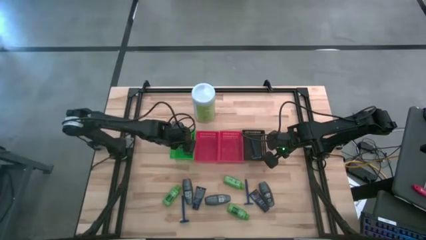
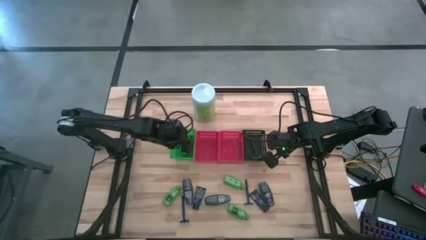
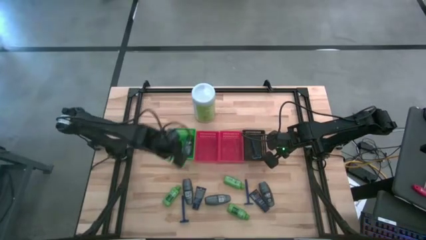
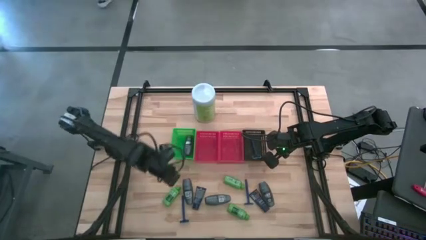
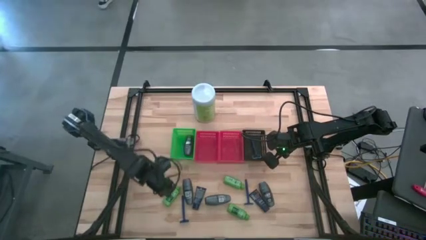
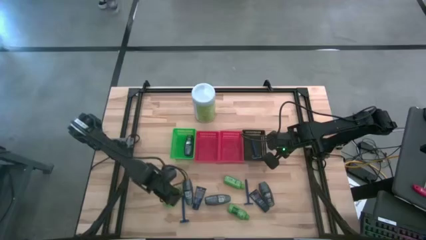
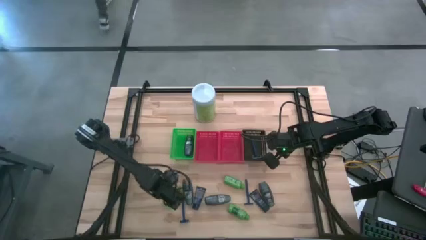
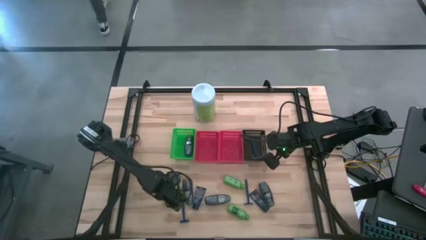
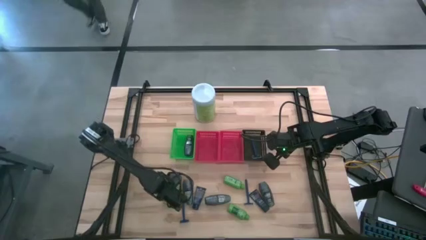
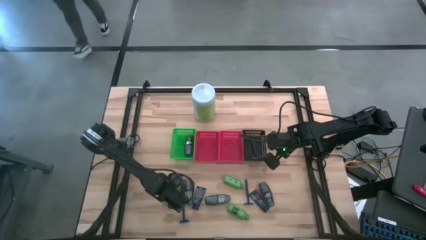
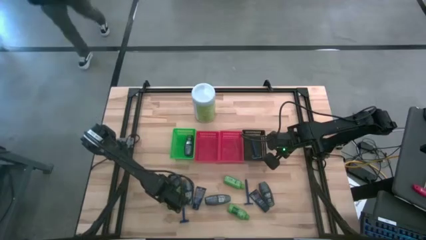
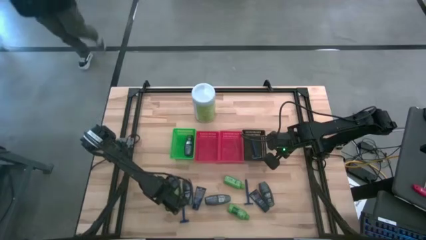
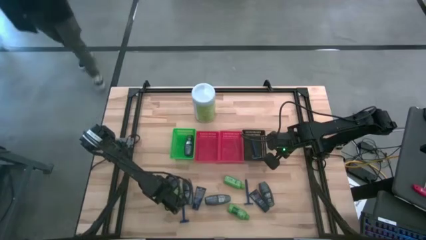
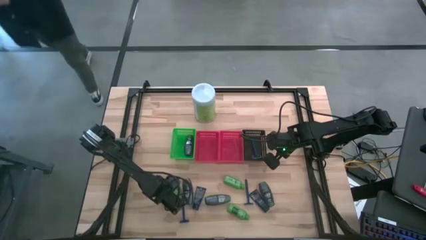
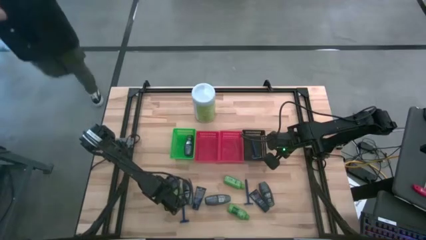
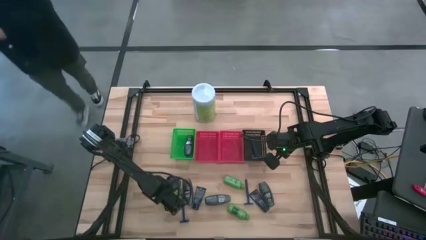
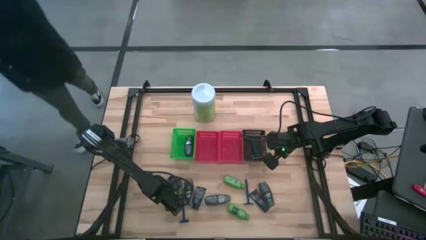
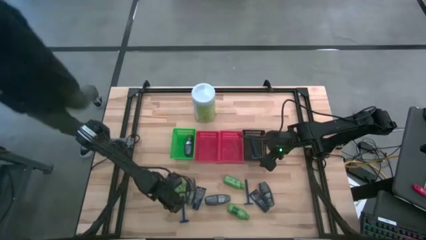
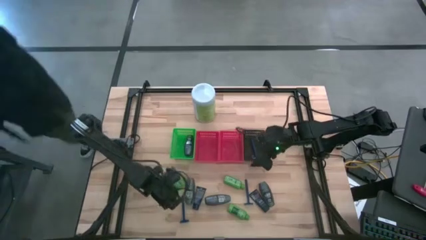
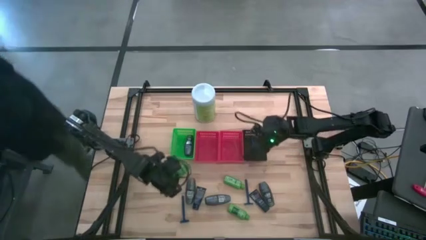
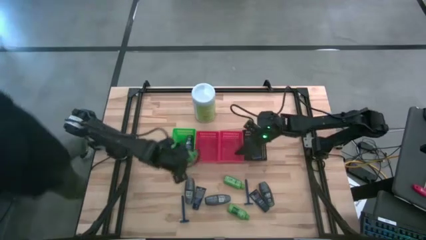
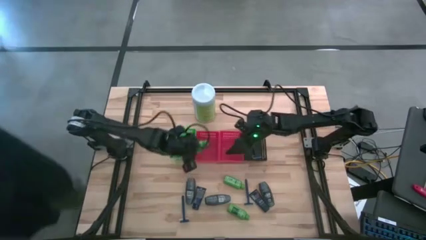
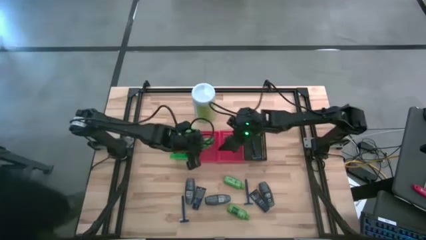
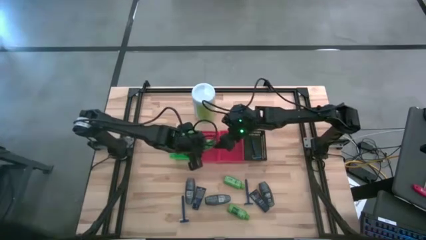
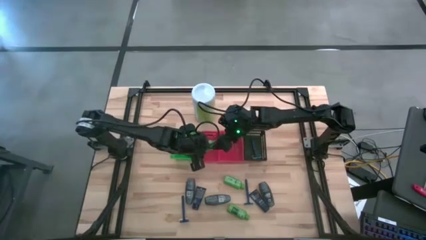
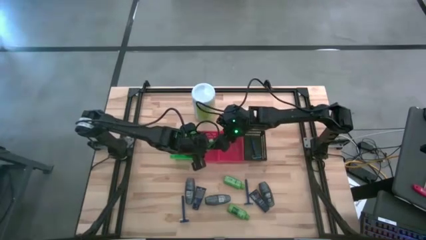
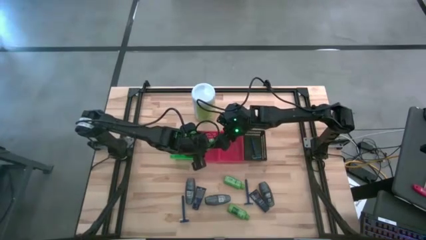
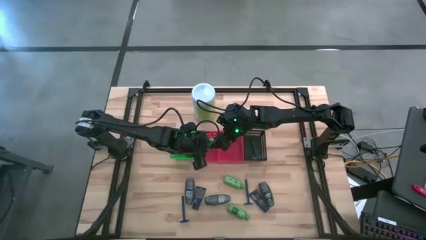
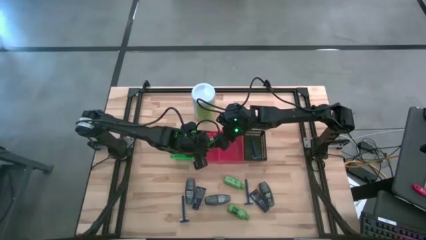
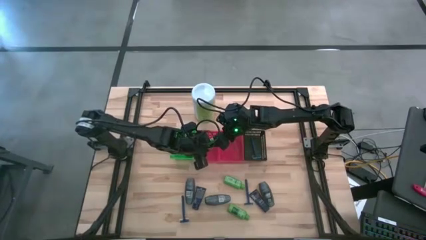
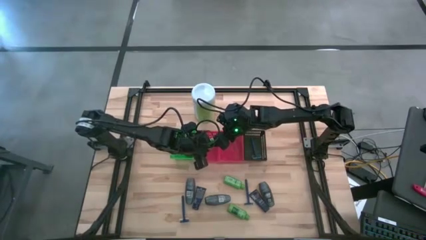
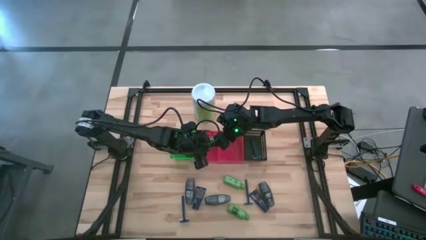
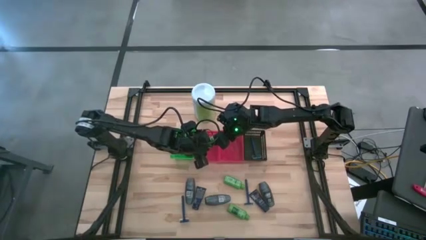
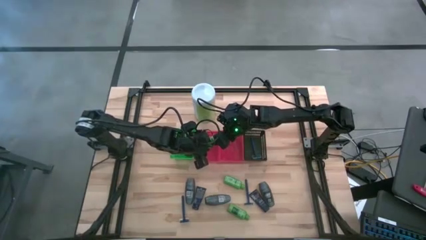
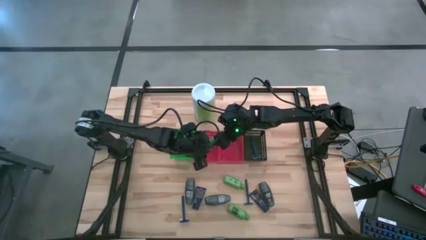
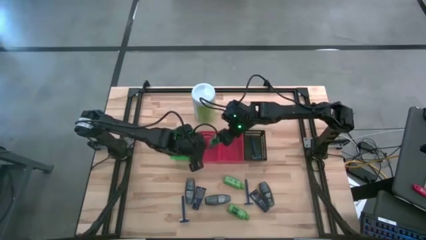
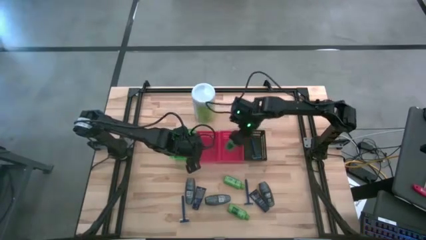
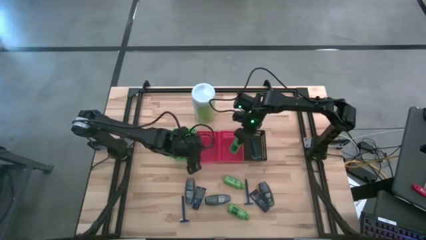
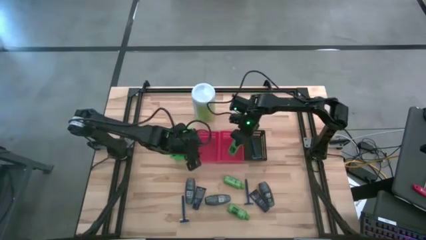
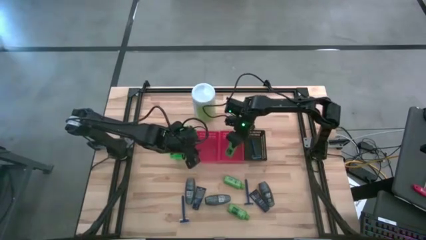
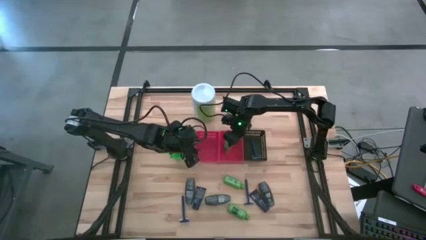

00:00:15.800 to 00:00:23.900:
Task: Pick & Place Travel size toiletries
Put the green shampoo in the right red bin

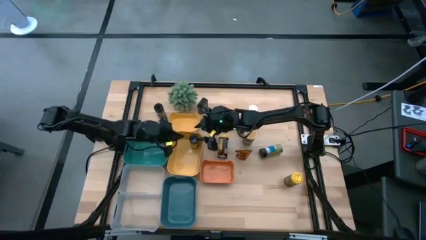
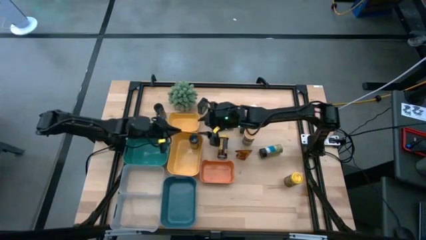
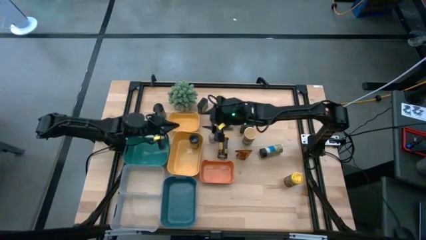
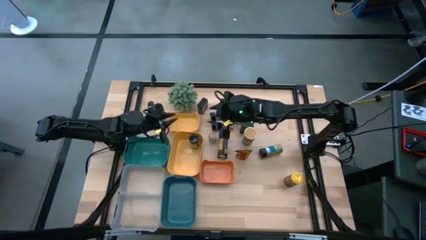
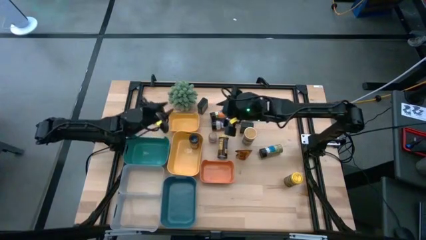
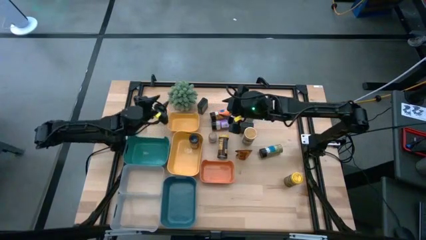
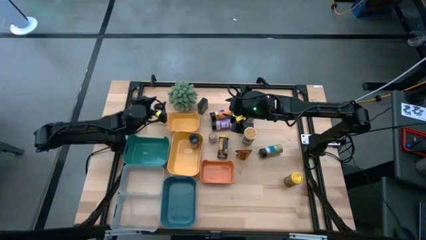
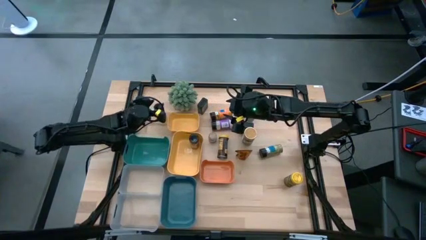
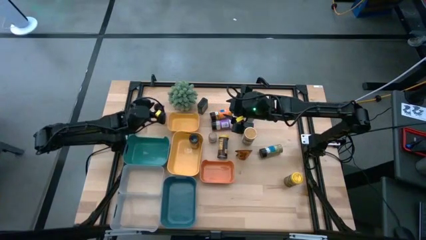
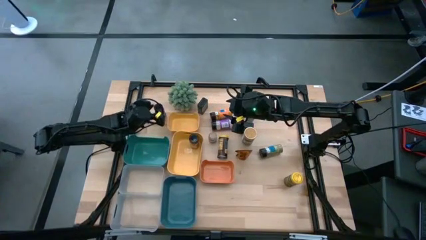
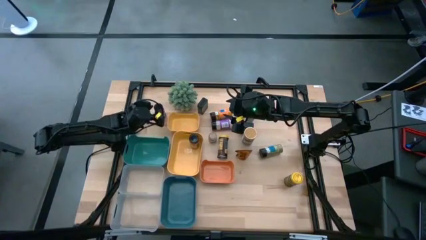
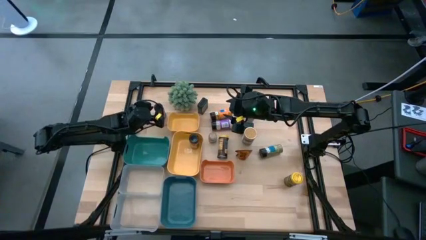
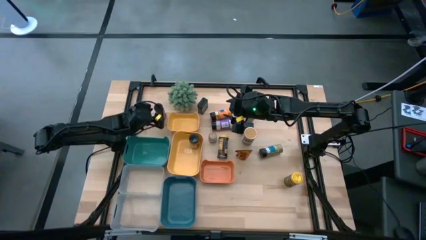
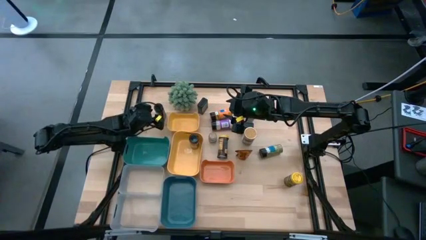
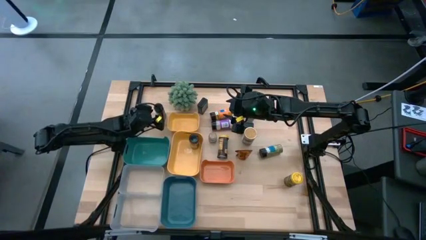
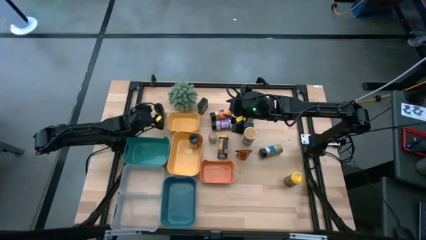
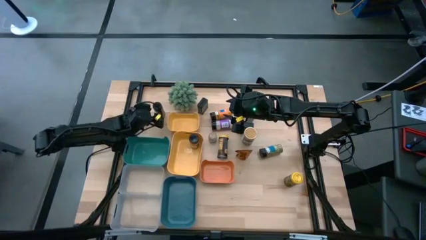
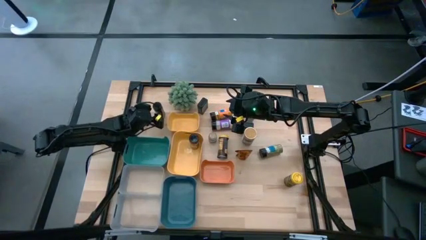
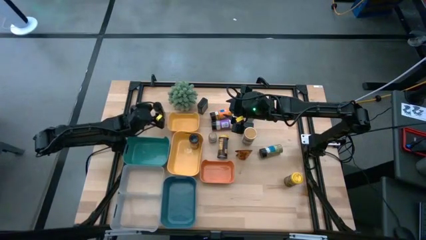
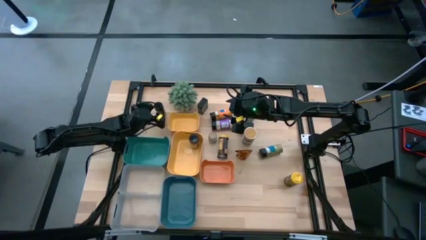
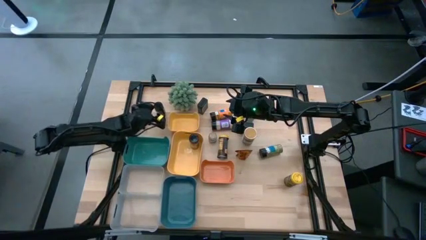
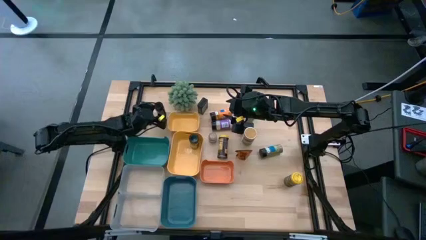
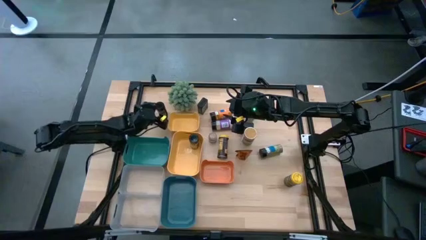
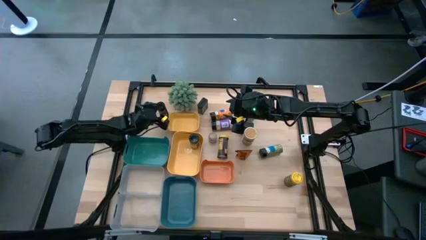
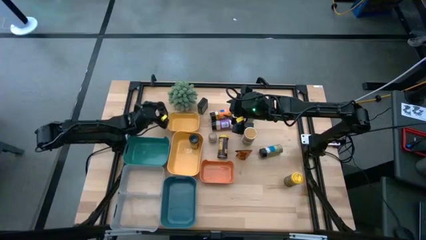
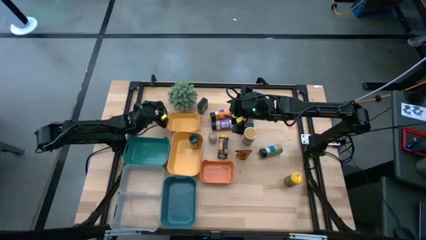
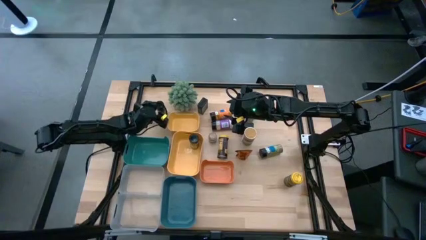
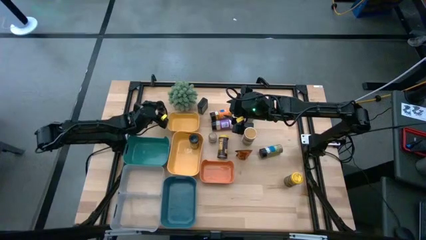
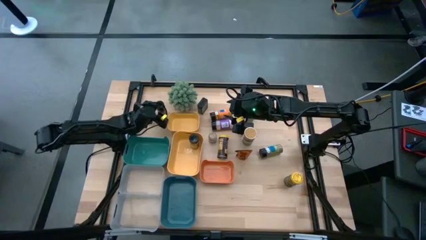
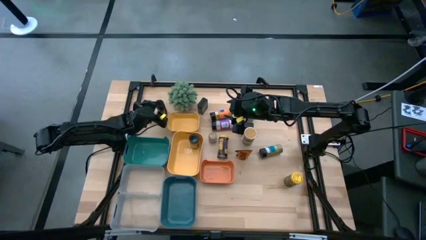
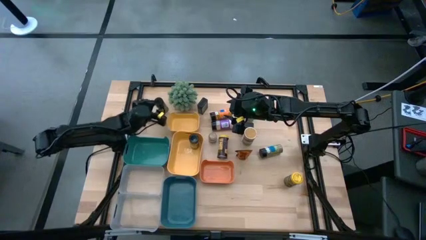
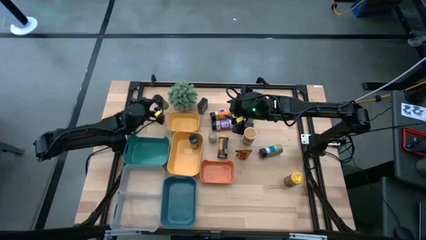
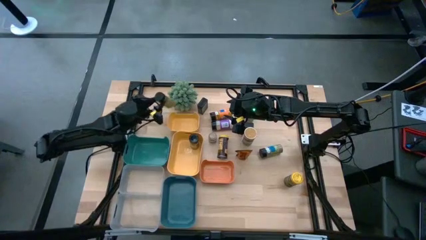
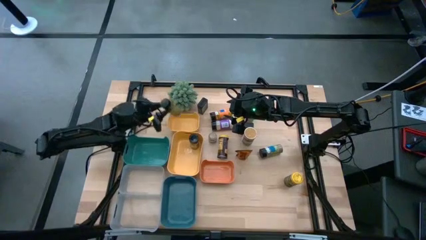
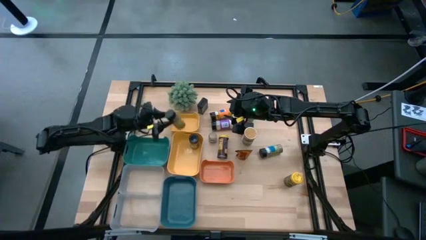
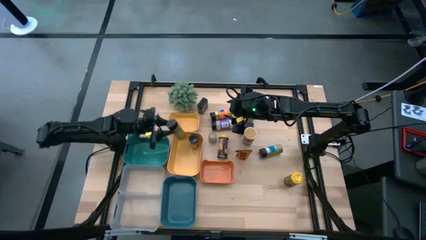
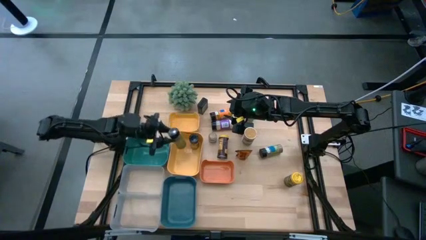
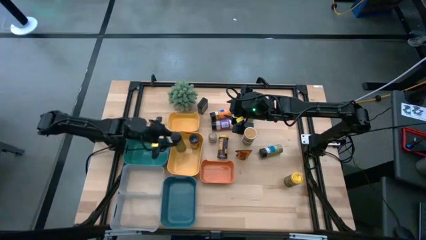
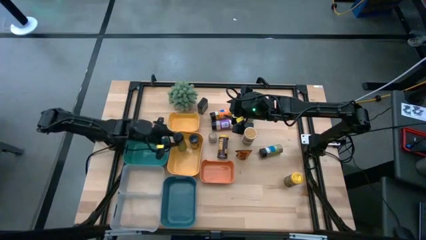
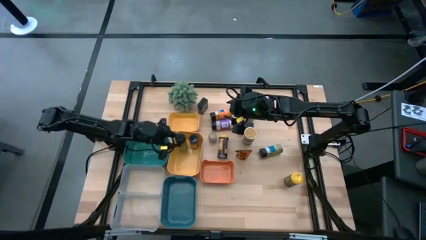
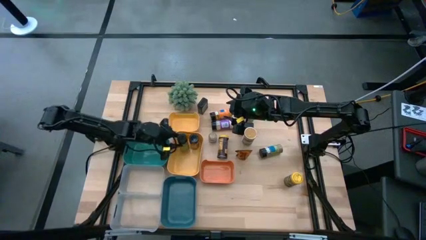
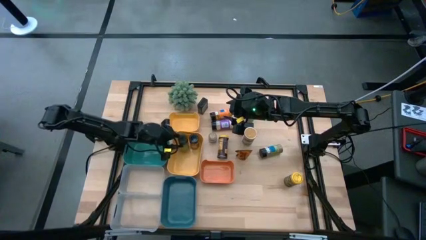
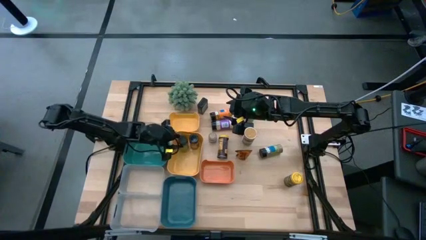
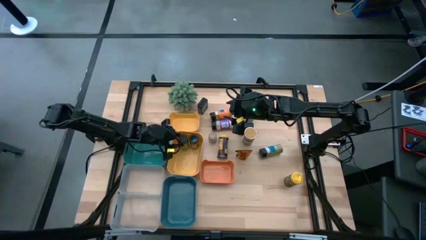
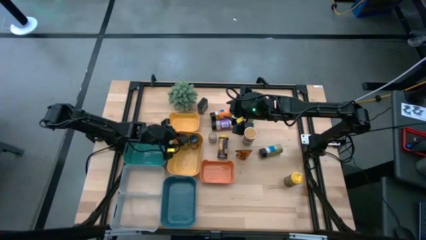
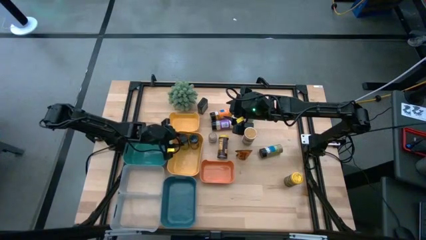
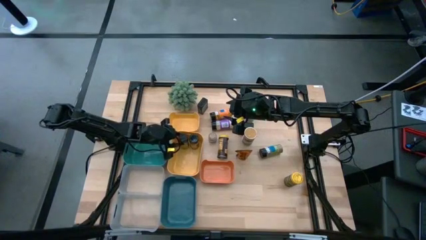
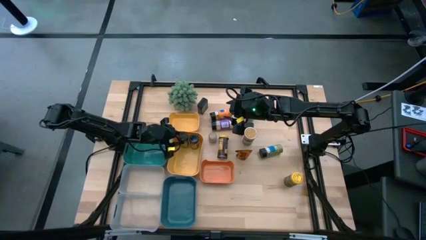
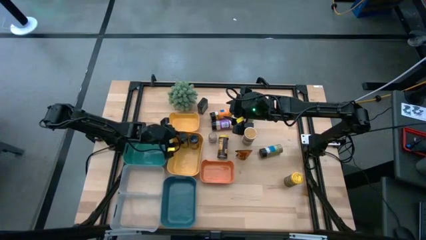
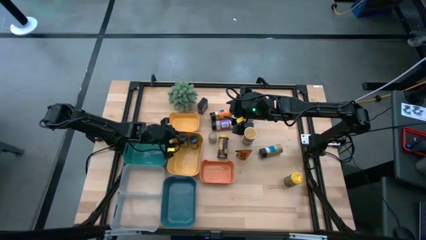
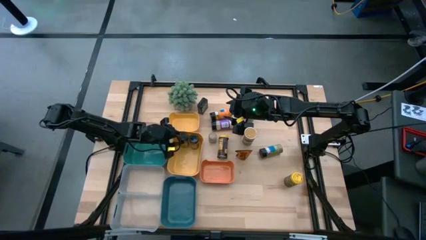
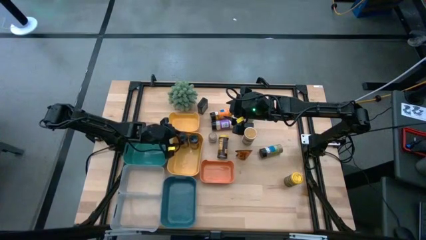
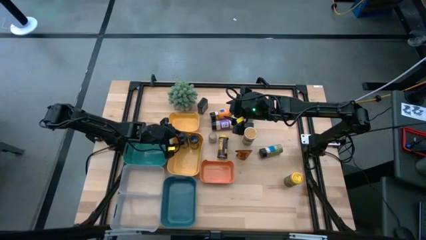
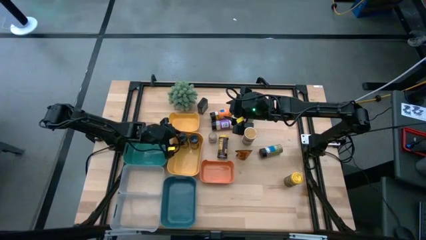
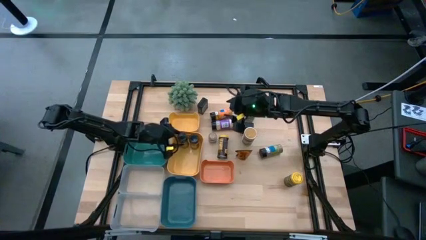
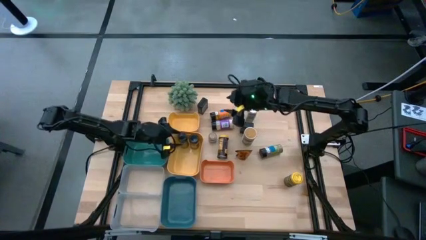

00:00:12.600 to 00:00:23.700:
Task: Sort spices by type
Put the black seasoning bottle into the bottom yellow bin
